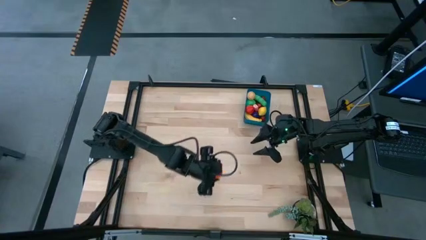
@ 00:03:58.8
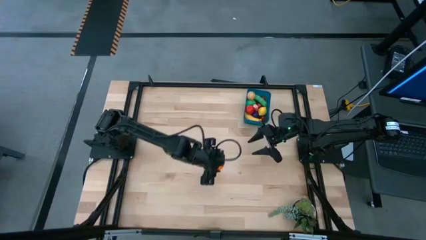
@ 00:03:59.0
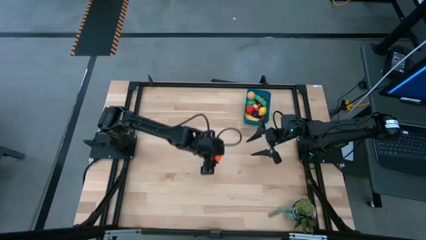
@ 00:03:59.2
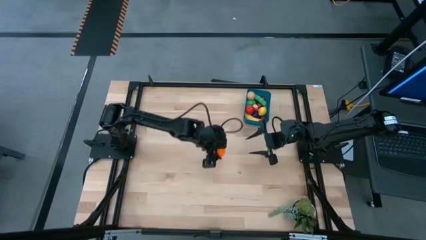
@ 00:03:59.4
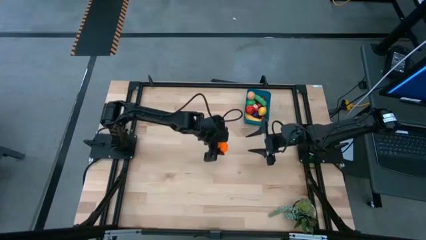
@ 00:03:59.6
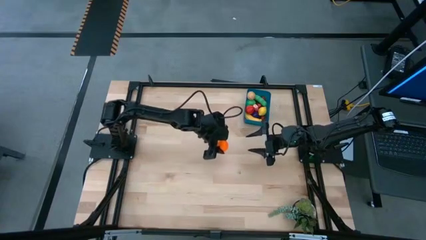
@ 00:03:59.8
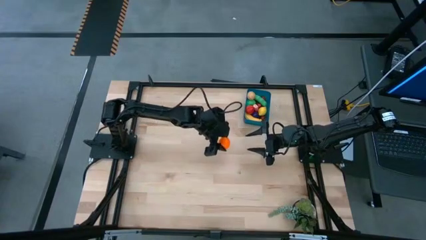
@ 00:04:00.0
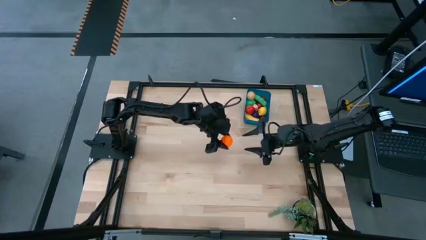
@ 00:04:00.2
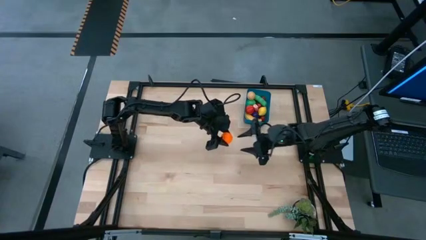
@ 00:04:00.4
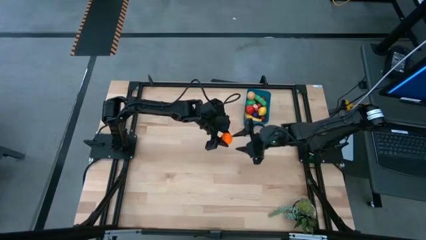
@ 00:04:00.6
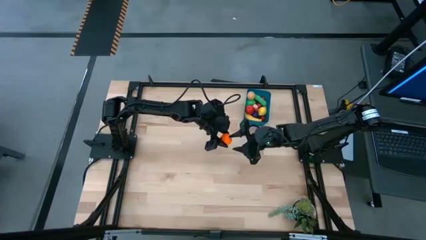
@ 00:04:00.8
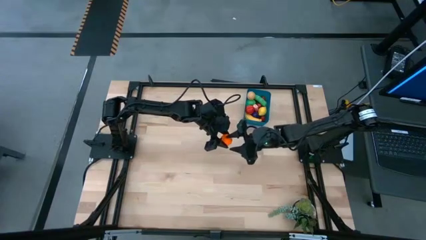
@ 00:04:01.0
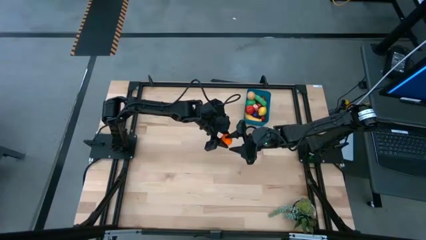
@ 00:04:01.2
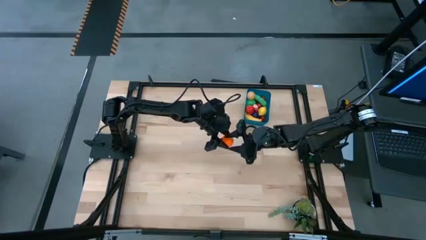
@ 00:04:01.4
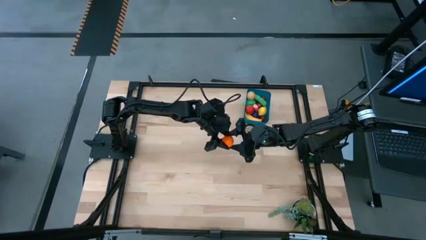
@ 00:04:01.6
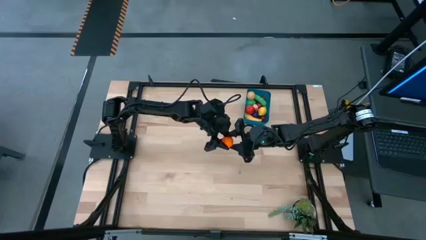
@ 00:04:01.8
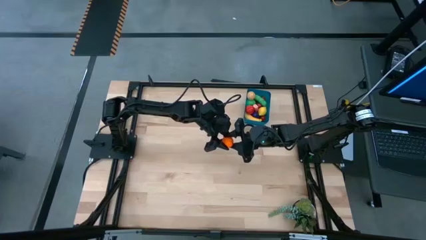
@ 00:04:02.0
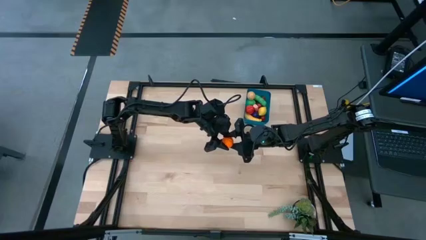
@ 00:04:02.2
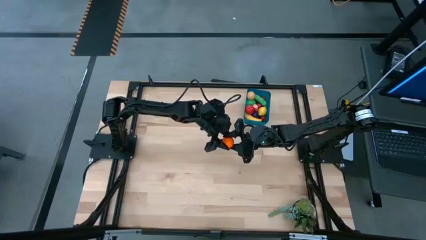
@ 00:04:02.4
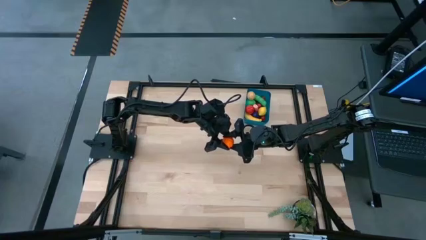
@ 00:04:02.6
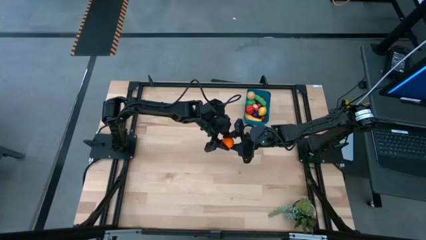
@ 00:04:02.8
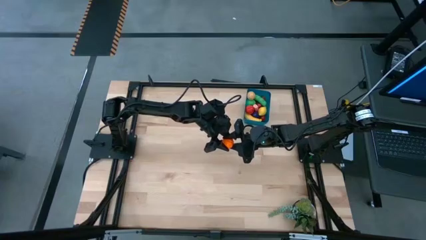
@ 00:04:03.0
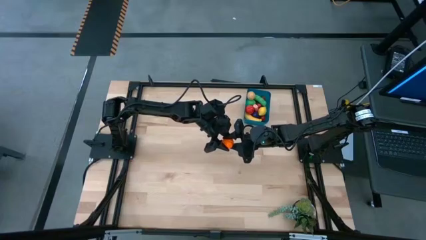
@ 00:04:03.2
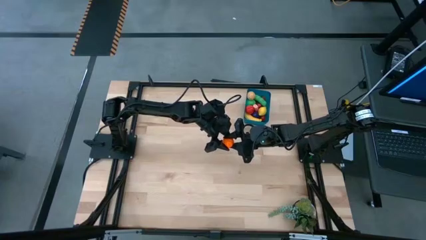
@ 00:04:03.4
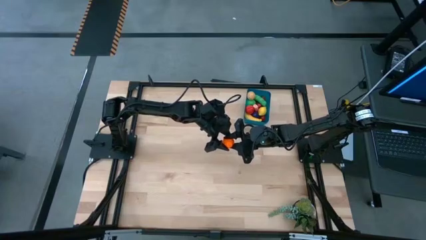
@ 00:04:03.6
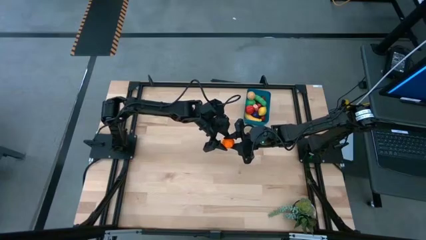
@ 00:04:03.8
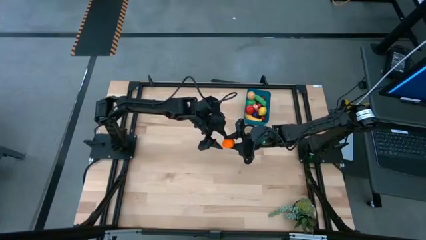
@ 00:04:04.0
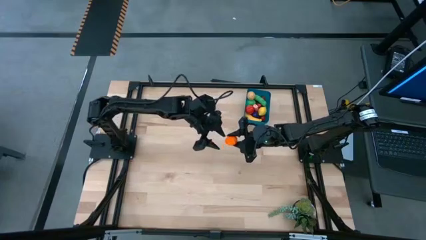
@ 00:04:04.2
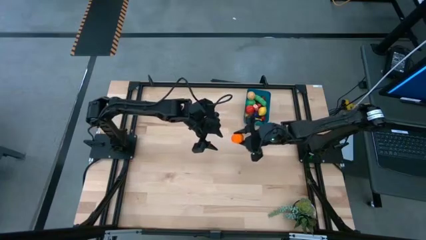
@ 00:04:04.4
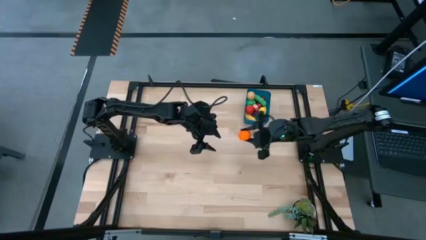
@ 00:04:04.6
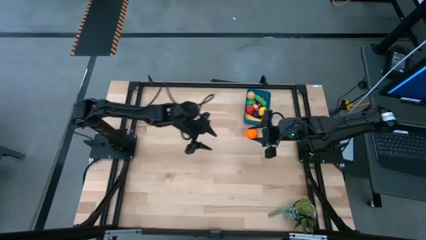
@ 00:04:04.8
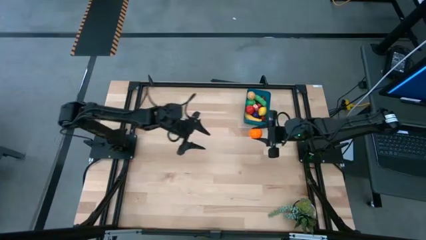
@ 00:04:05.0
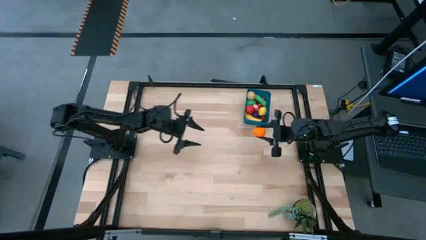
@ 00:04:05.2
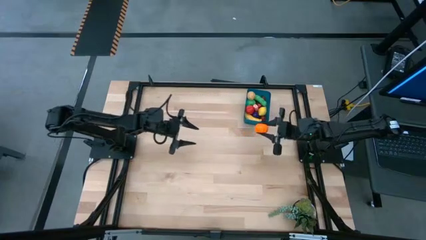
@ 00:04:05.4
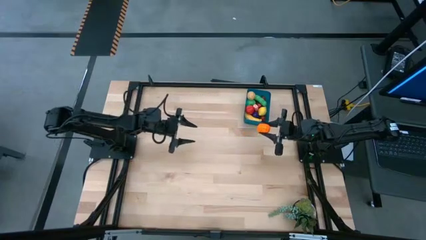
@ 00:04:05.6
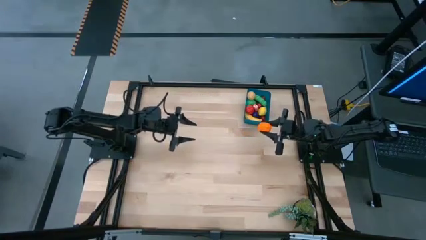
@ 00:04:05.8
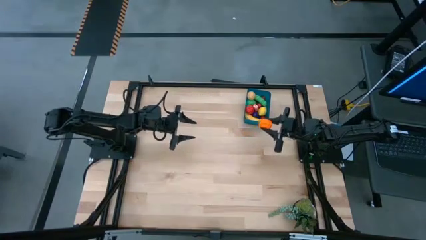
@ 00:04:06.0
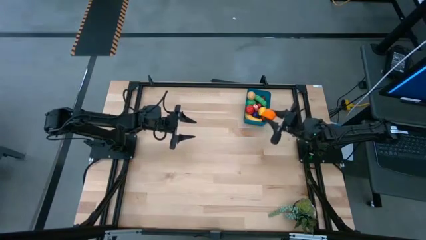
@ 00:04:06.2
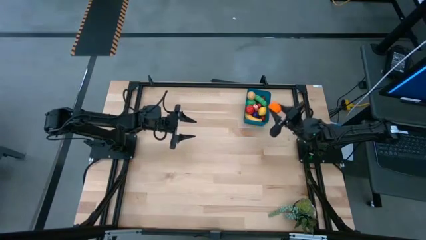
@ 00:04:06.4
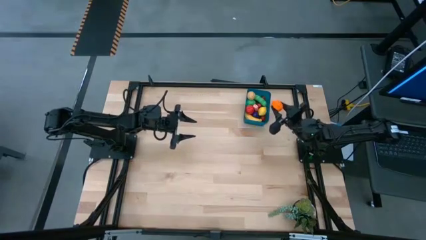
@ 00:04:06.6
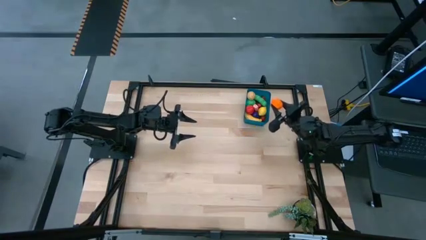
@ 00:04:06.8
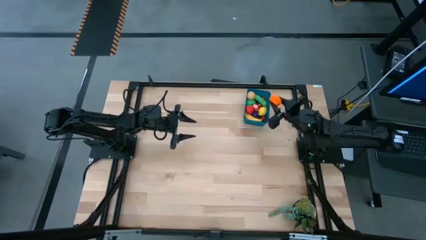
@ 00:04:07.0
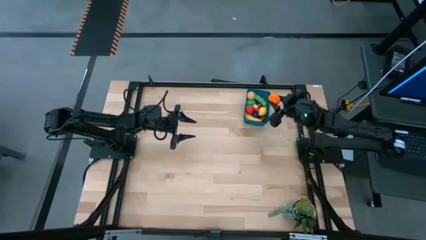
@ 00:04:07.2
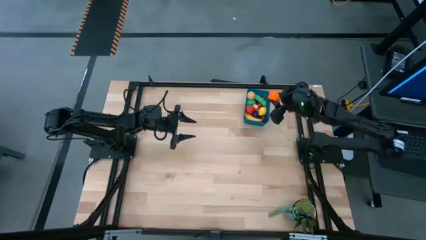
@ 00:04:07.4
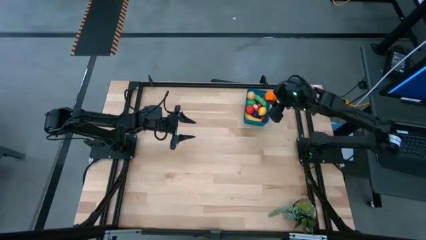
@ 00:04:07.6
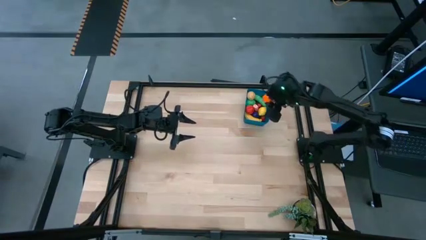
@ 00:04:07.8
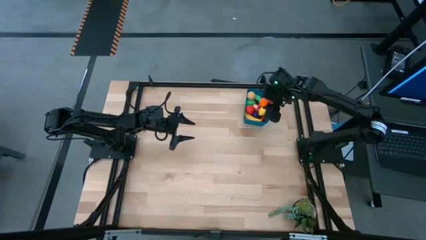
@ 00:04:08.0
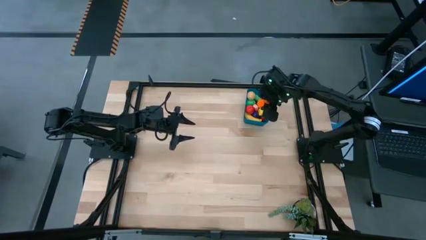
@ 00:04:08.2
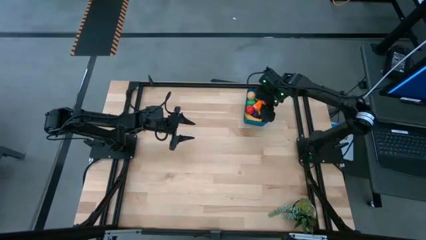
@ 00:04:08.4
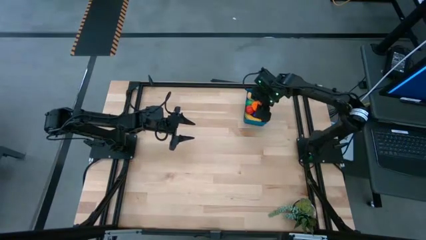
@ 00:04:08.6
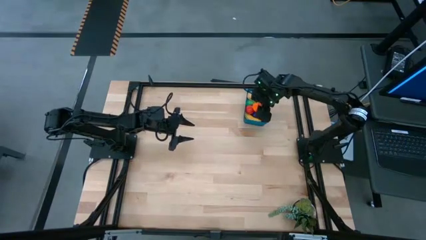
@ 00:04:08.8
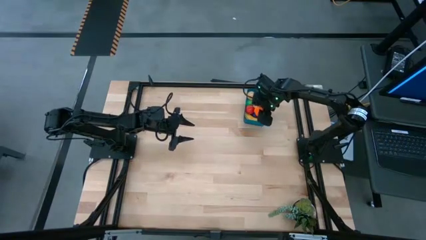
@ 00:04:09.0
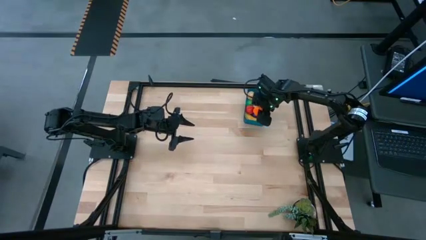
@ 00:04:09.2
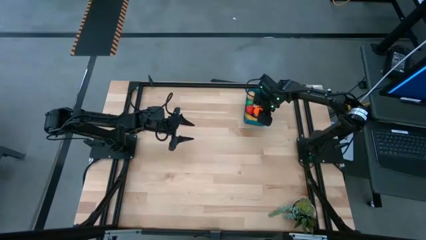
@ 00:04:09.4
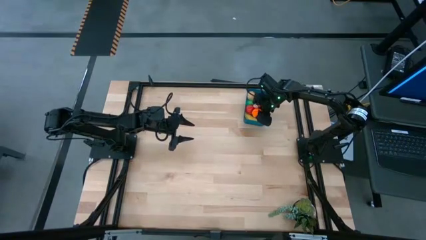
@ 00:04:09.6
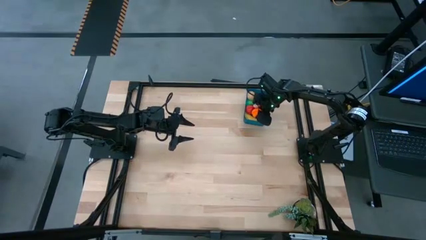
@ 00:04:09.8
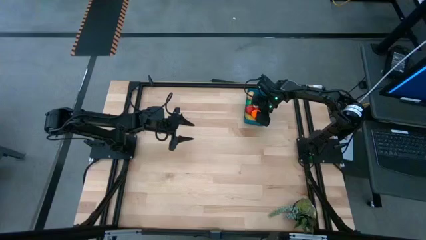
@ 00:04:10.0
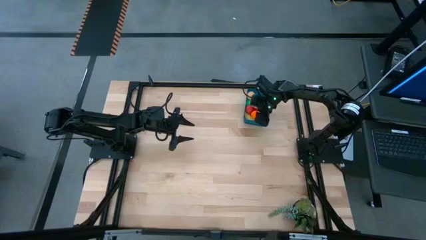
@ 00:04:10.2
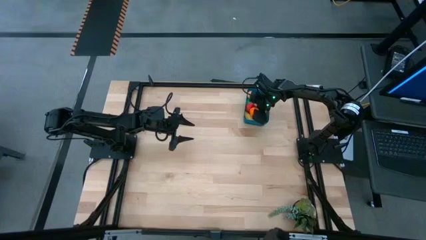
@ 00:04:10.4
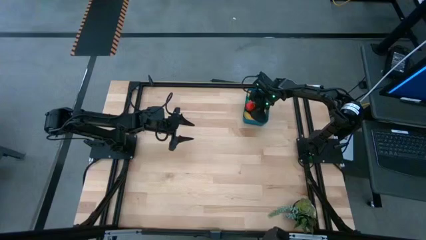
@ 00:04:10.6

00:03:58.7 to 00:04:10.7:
Task: Pick and placing Produce into tupperware
Put the orange pumpkin into the blue bin

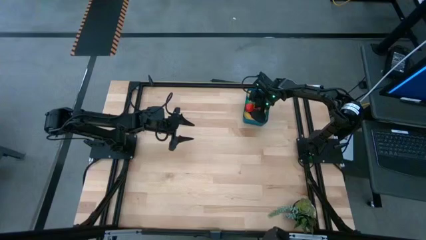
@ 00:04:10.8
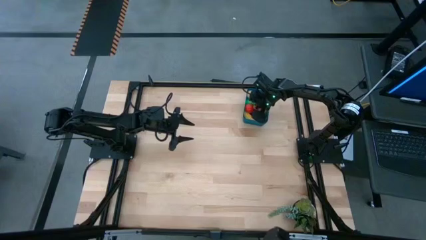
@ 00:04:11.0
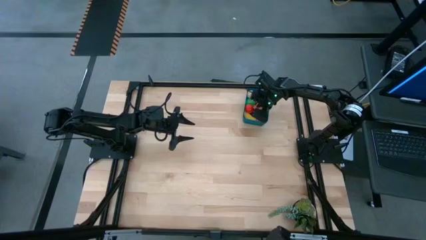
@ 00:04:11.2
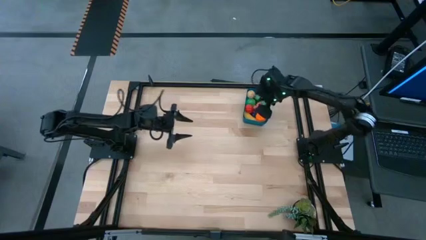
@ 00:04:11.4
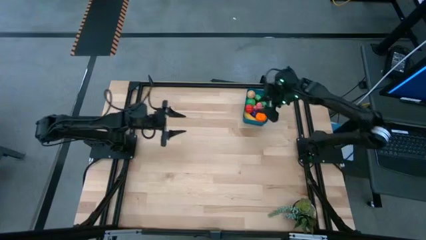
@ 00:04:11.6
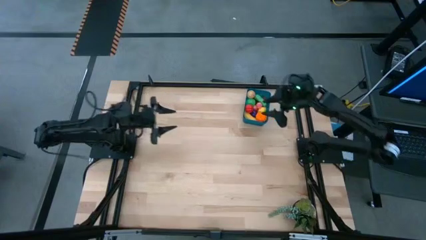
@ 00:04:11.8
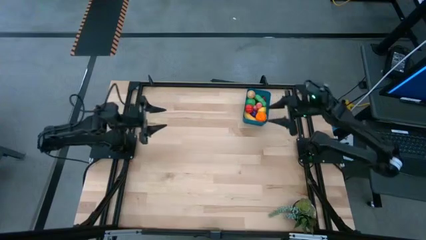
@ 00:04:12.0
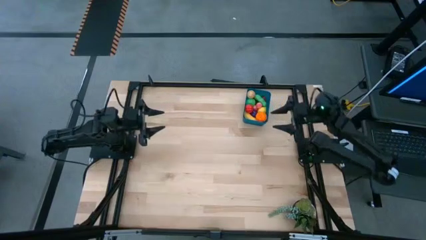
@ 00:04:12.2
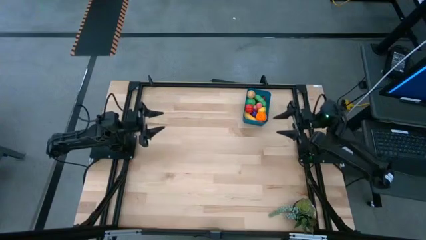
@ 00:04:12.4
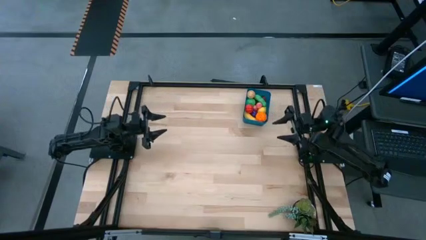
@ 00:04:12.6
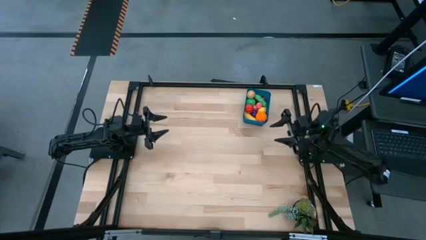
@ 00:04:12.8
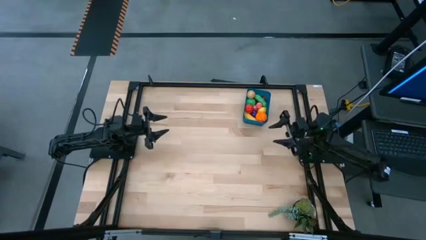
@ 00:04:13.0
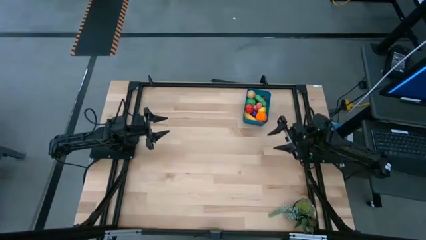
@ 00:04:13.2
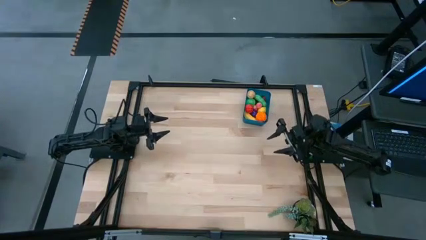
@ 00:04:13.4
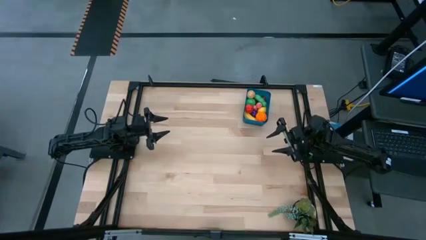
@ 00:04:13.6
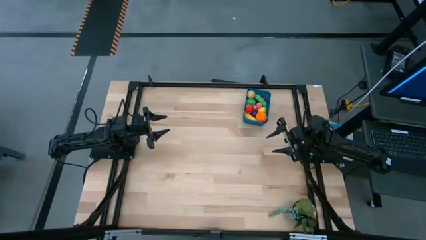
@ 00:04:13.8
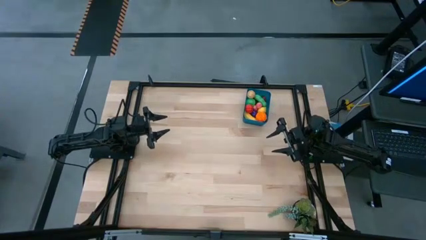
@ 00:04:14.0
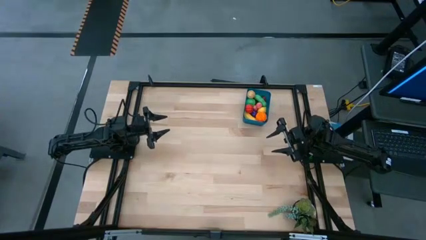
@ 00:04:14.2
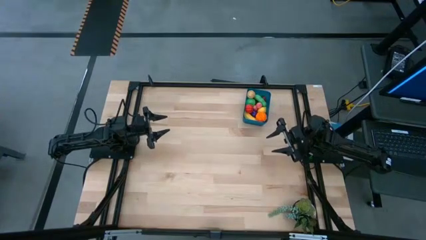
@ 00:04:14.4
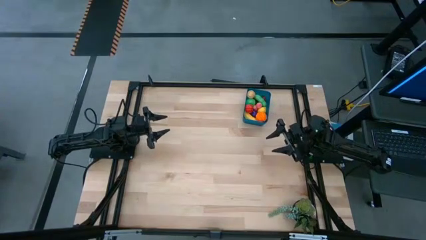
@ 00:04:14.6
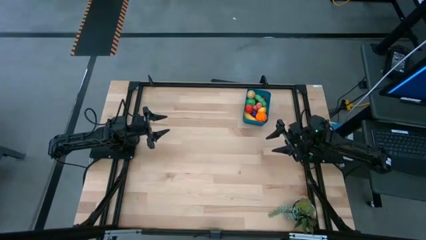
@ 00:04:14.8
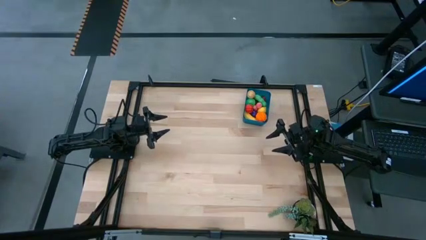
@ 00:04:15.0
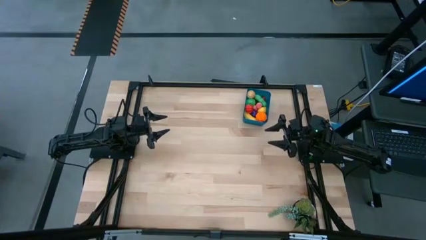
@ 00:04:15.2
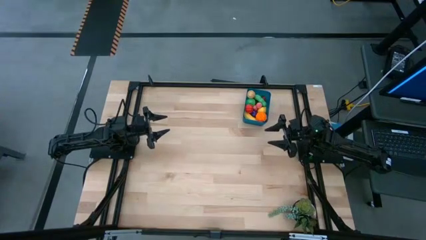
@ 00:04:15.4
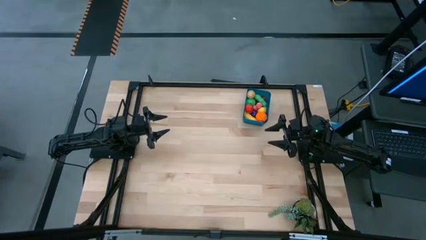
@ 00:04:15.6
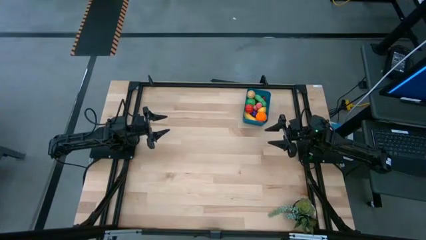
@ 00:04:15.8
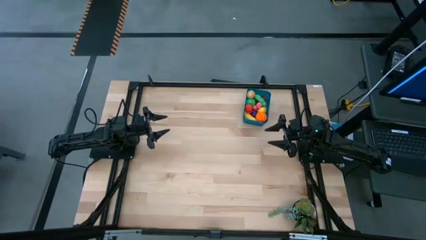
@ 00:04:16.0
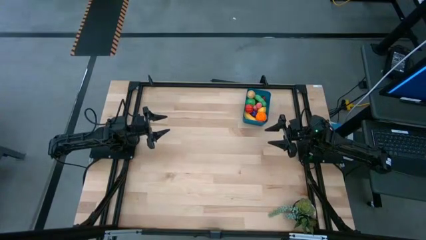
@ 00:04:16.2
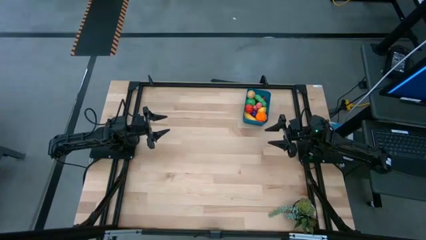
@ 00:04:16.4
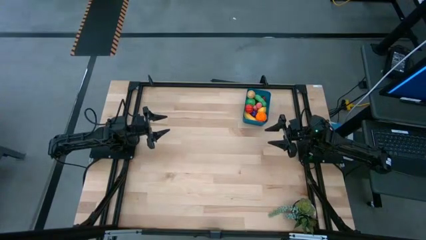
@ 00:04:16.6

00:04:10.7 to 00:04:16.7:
Return to Home Position
